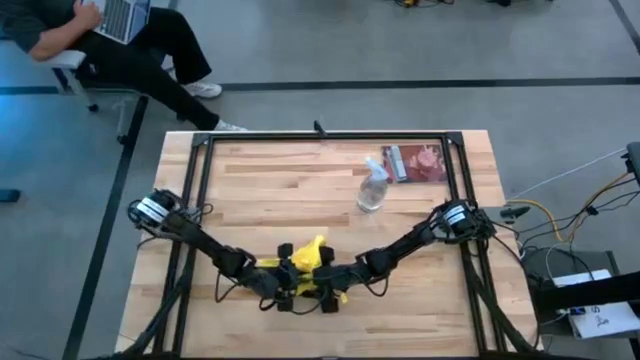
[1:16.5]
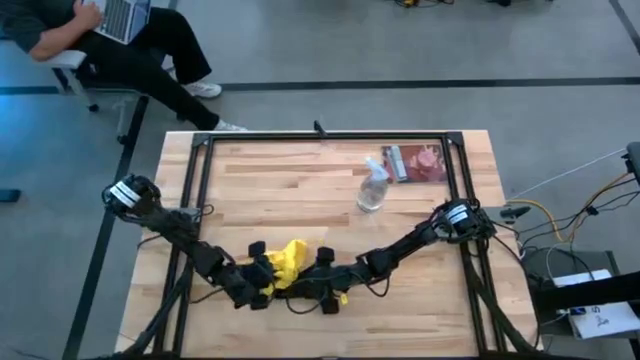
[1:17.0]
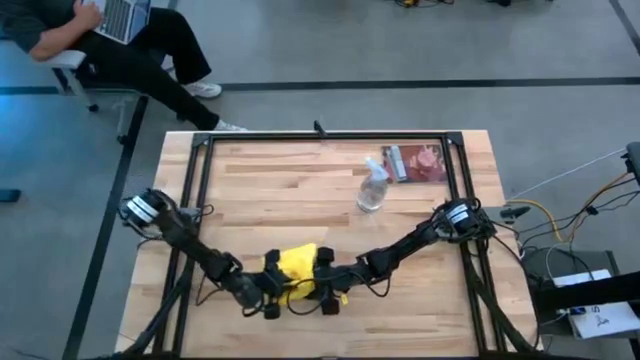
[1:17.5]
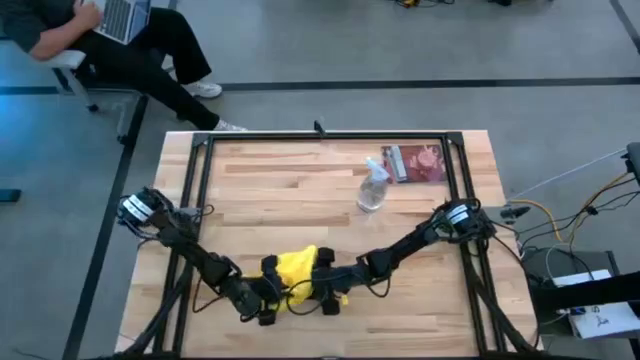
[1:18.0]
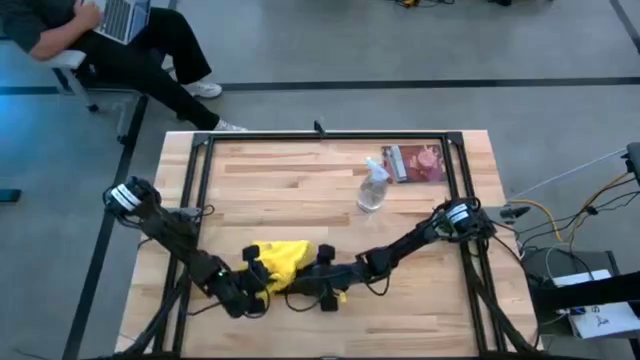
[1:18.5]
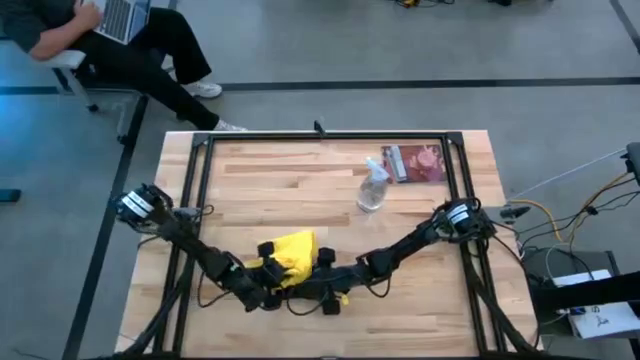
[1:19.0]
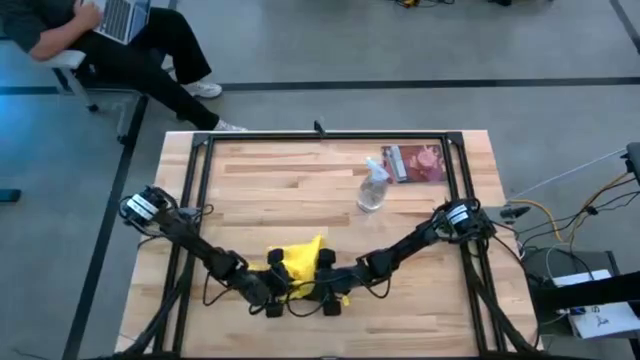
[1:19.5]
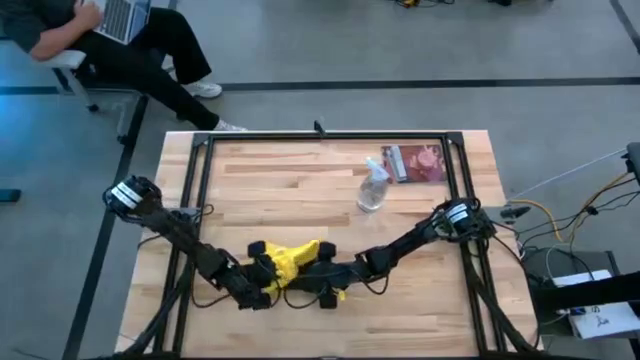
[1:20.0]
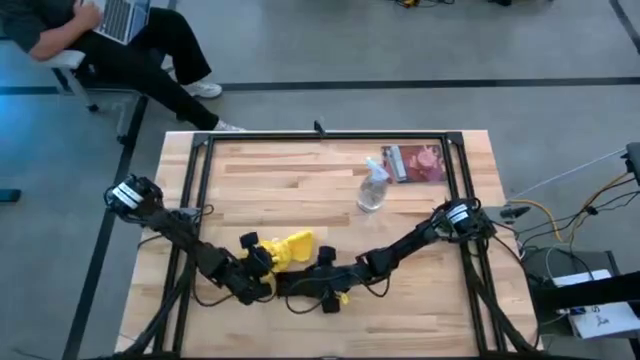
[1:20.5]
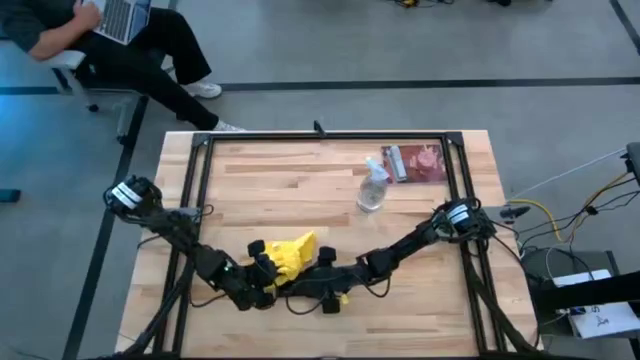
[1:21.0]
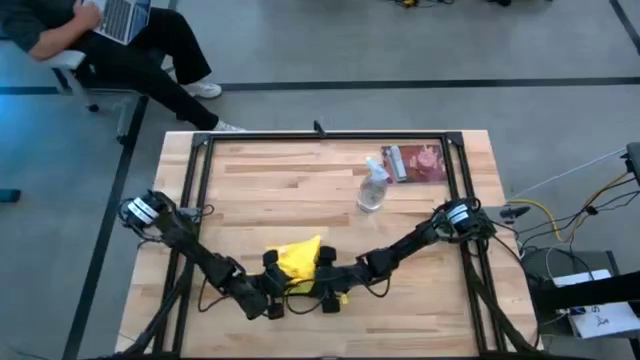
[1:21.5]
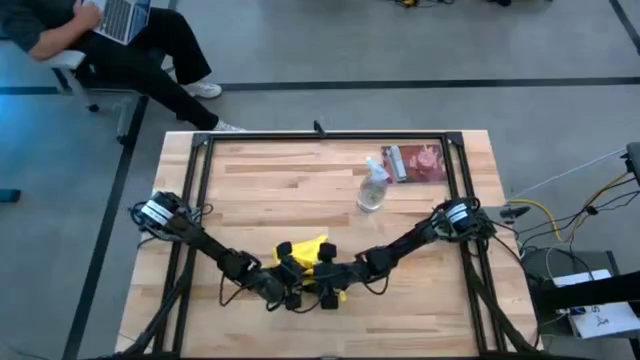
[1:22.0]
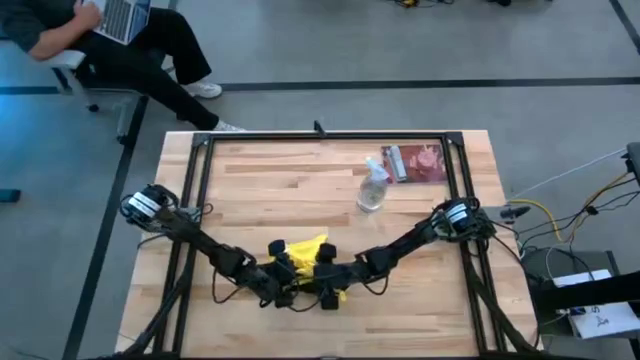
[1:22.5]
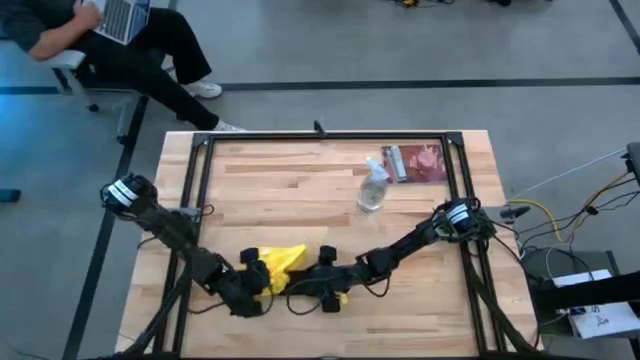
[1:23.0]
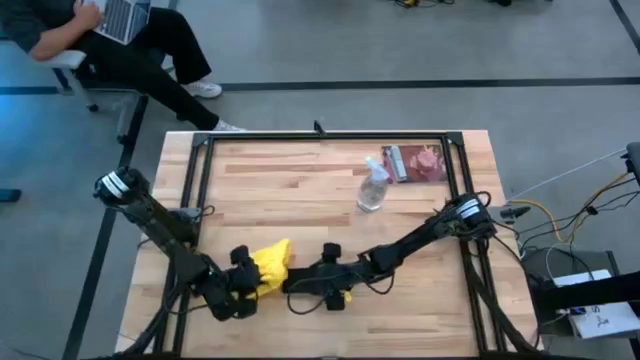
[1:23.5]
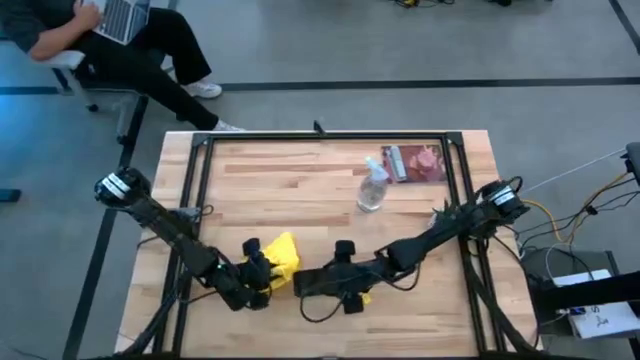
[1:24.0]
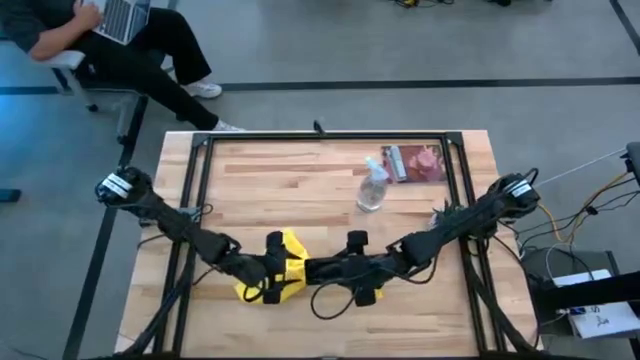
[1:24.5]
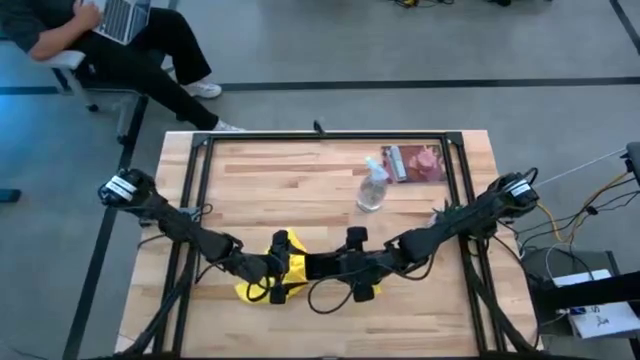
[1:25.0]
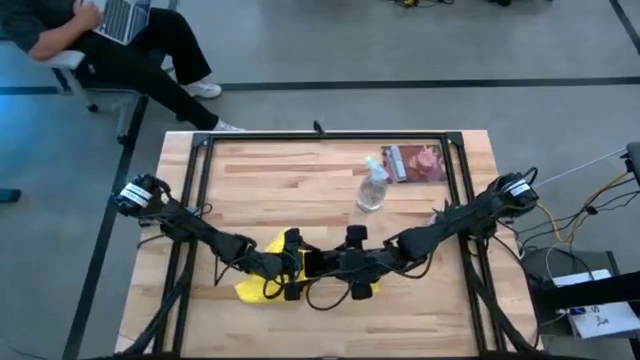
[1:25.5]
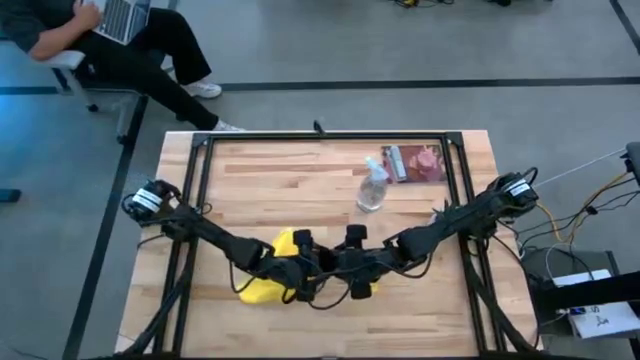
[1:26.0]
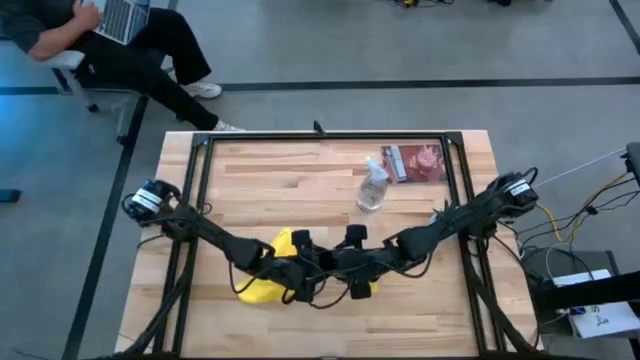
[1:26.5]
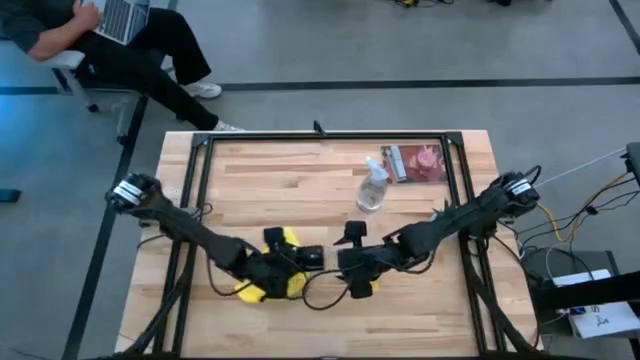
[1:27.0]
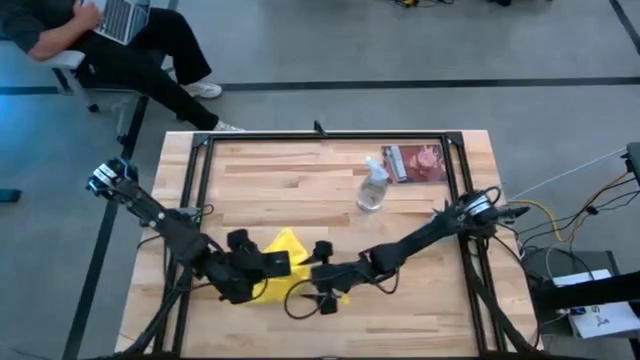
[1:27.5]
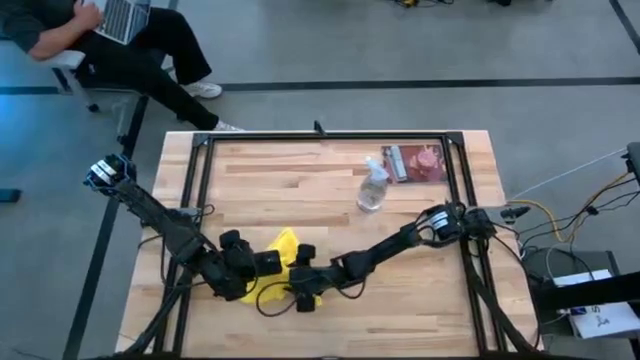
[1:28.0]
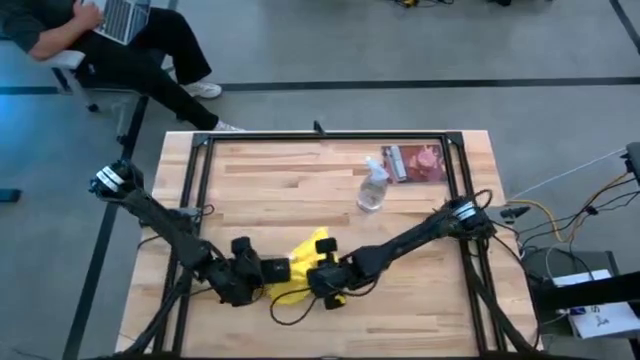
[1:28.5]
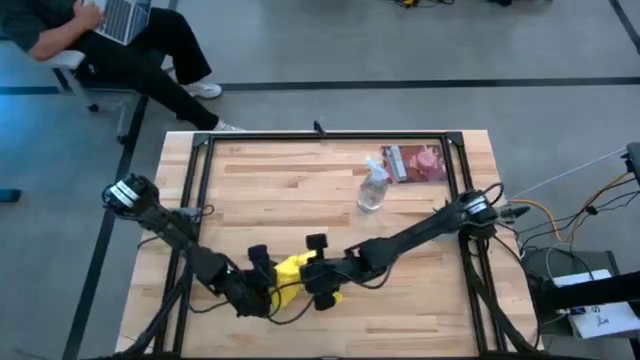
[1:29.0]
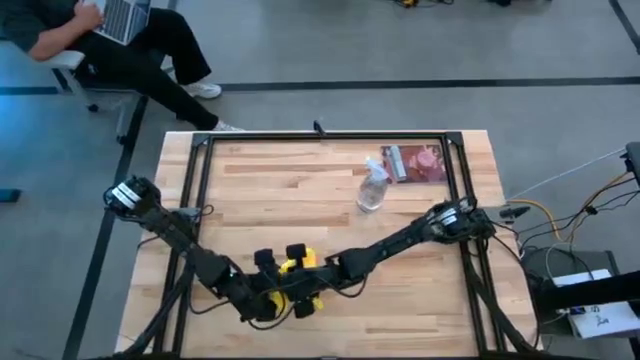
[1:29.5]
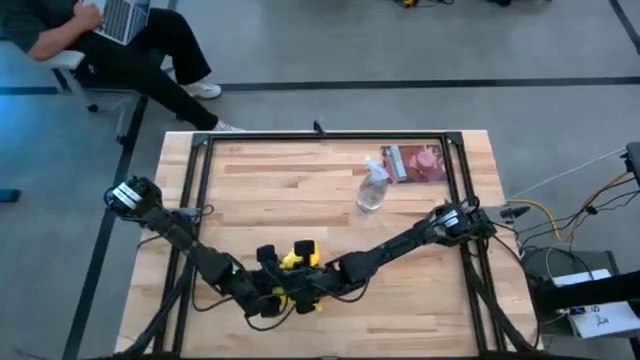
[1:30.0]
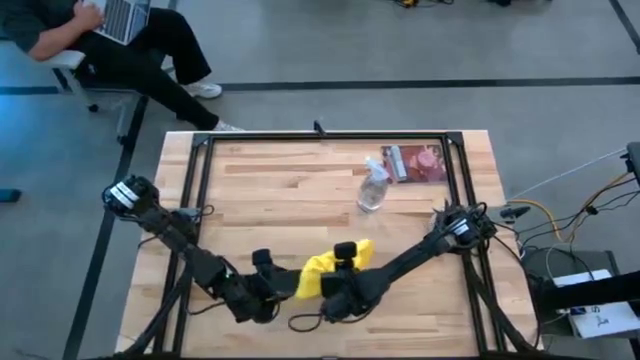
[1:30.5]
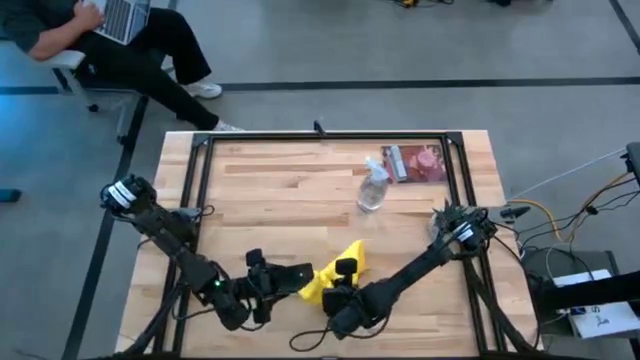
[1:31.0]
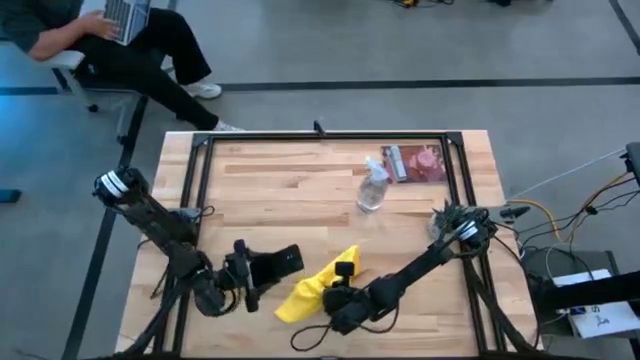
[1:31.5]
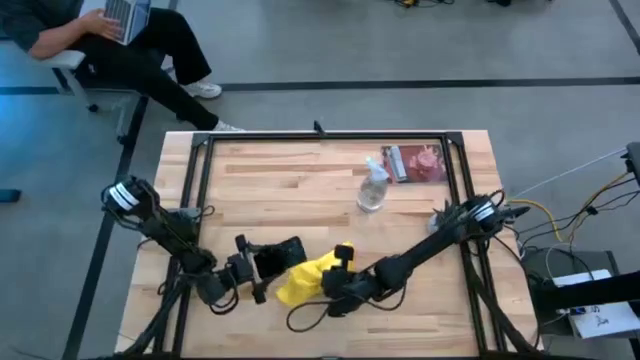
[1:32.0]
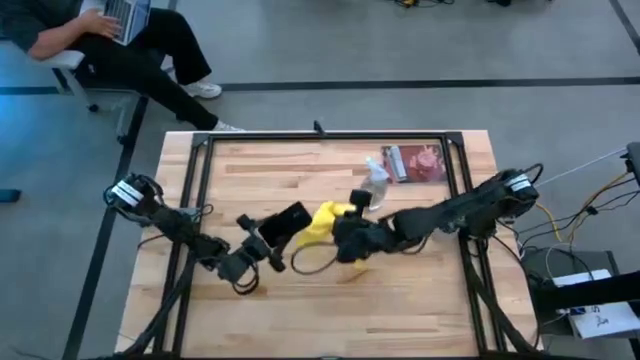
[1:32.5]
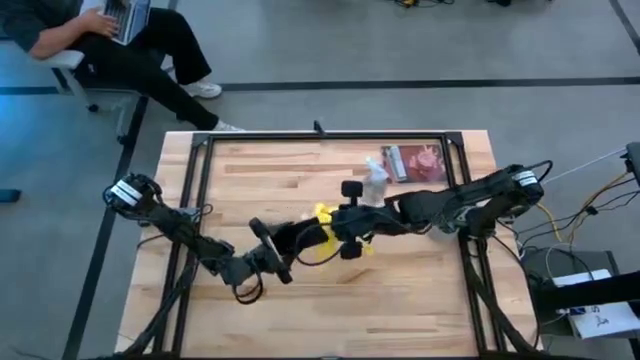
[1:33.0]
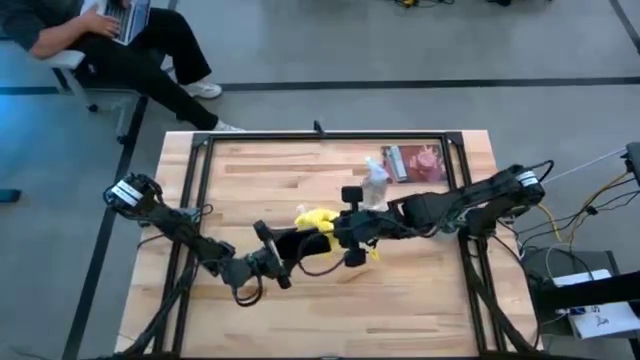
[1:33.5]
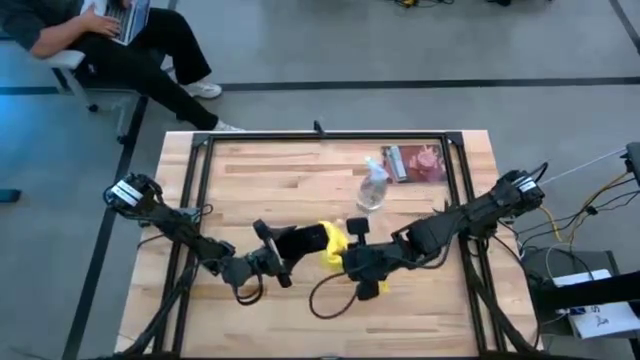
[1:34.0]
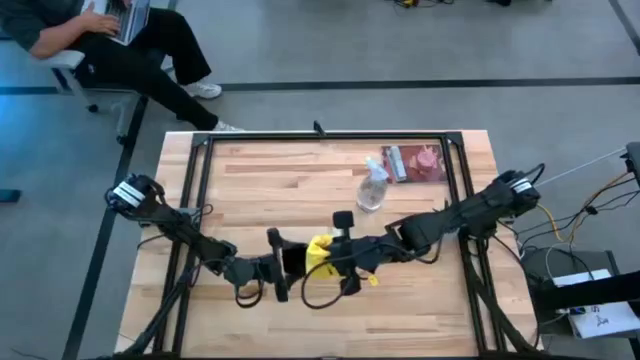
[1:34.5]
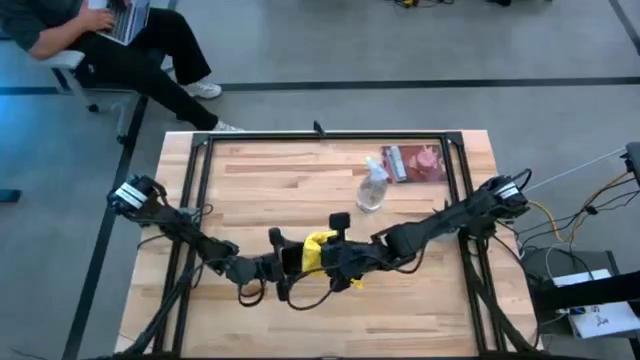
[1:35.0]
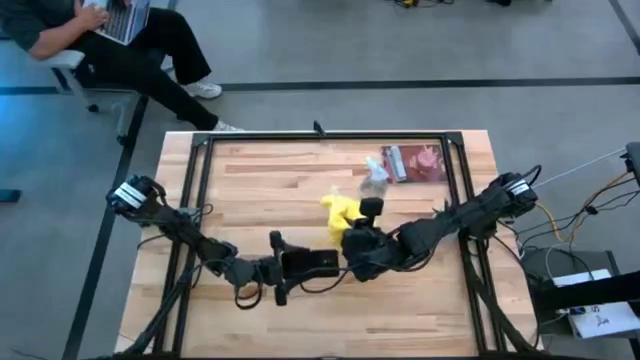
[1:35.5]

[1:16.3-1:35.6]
Task: Apply microfiber cloth
Wipe the black cellphone with the yellow microfiber cloth

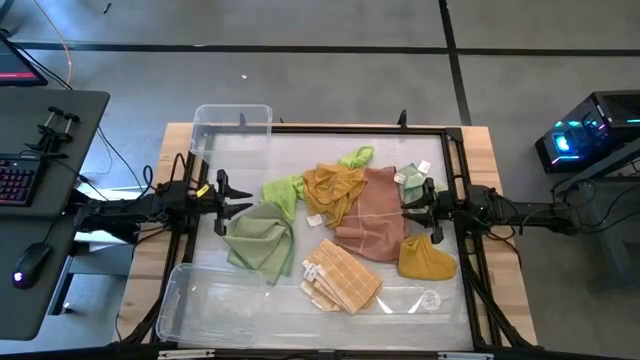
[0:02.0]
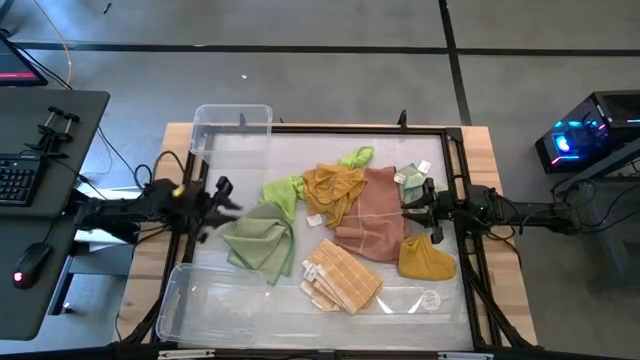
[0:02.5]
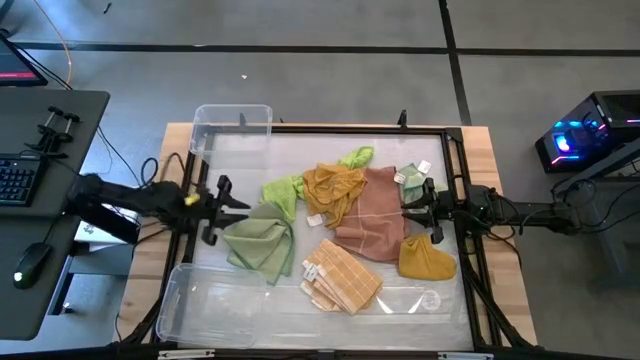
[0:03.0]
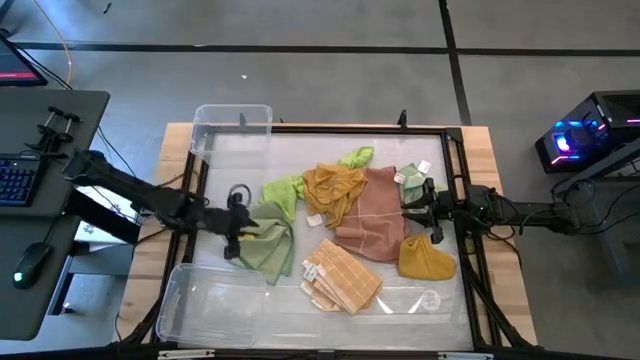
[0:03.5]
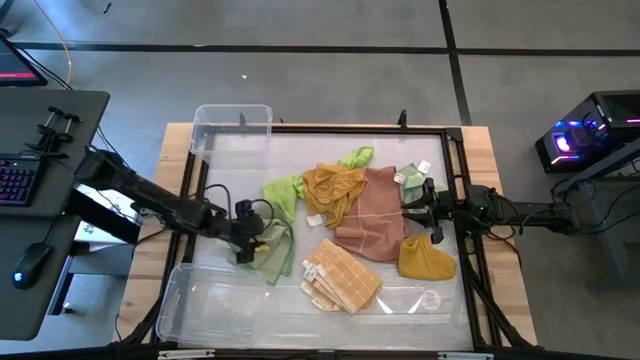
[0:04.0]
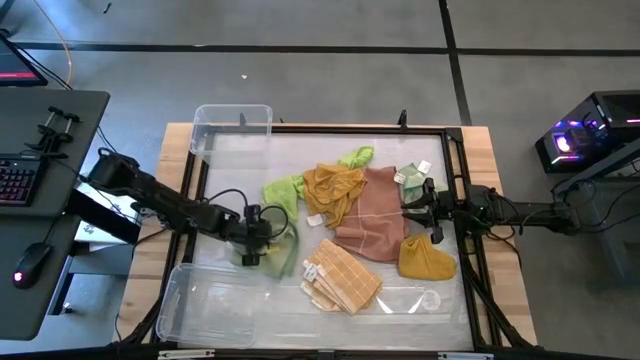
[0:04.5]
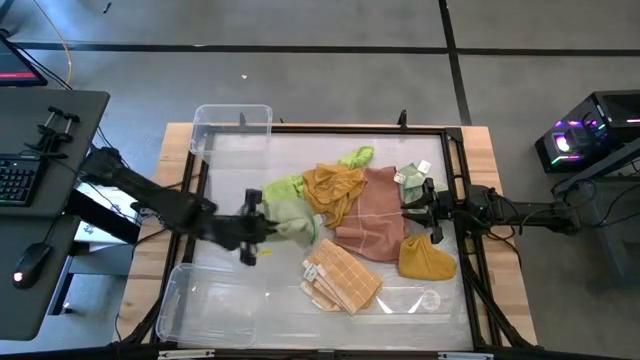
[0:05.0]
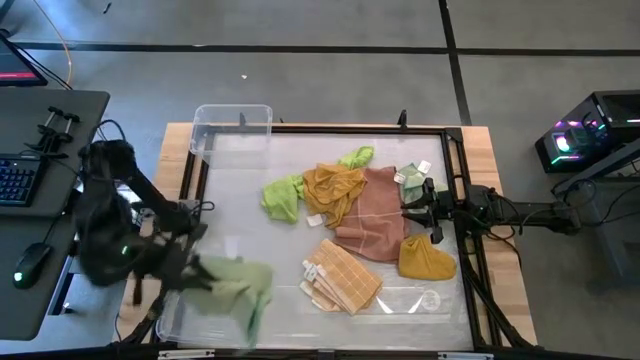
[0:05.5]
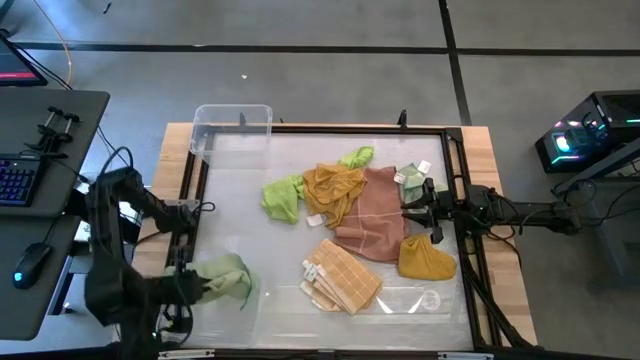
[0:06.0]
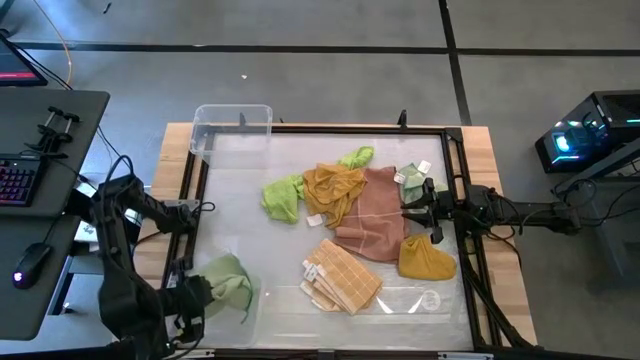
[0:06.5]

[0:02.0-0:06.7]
Task: Sort towels by color in basket
Put the green towel into the bottom transparent bin
